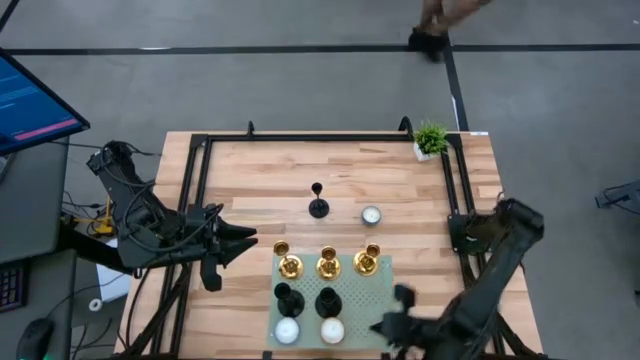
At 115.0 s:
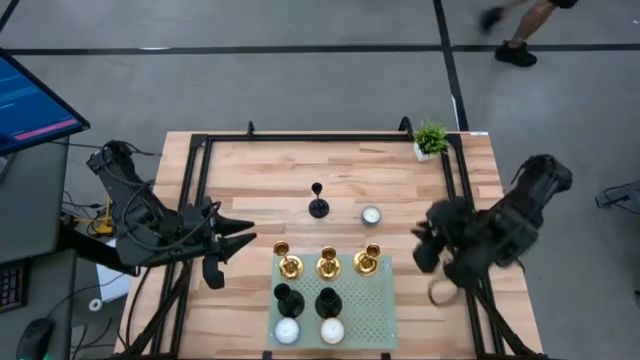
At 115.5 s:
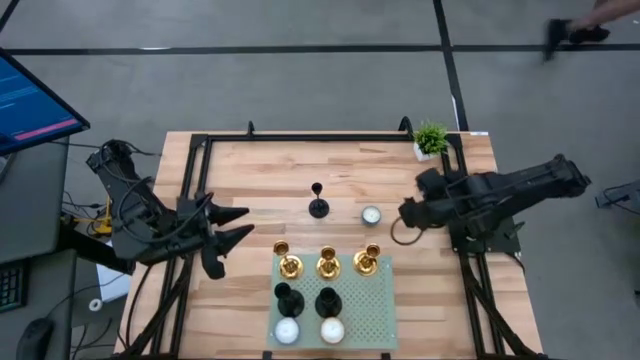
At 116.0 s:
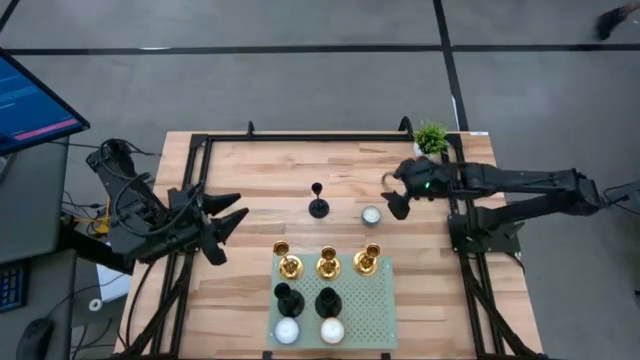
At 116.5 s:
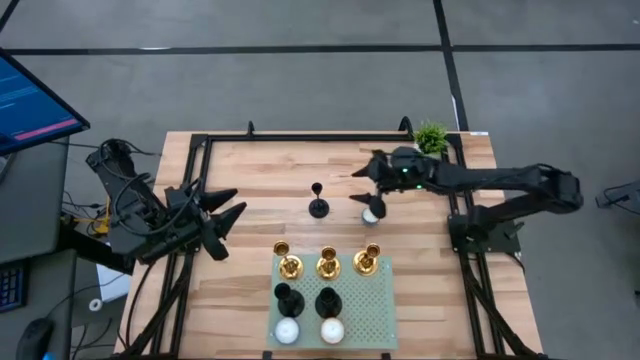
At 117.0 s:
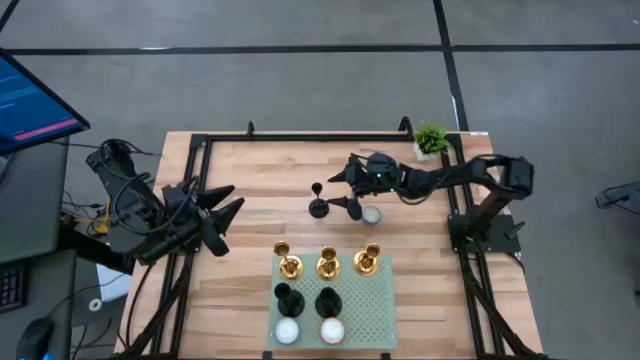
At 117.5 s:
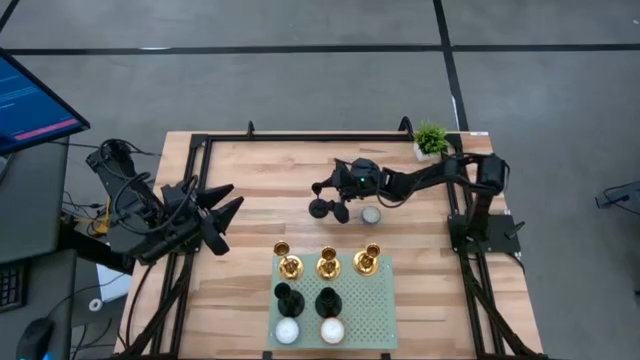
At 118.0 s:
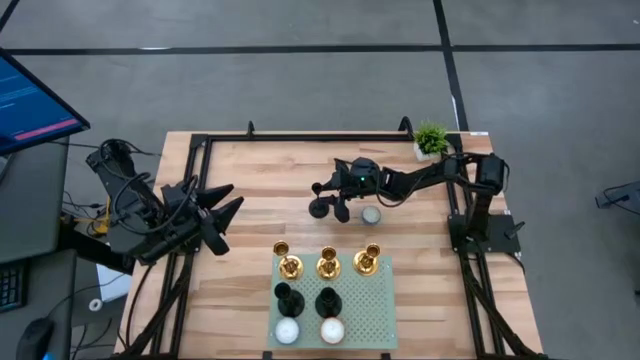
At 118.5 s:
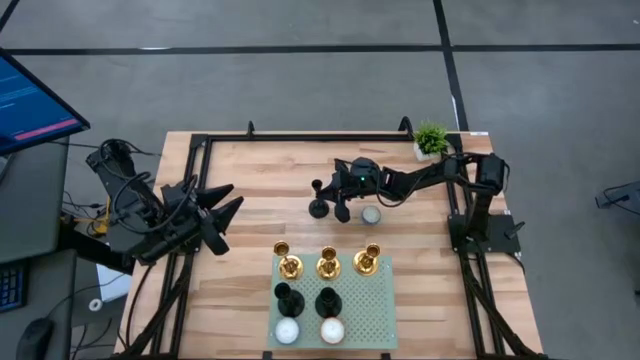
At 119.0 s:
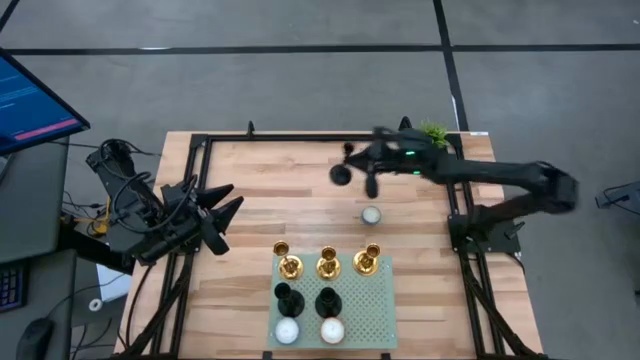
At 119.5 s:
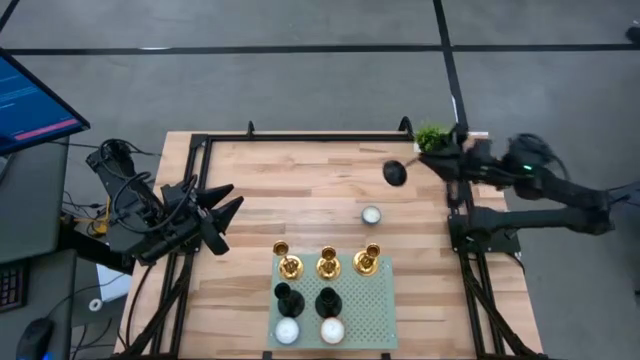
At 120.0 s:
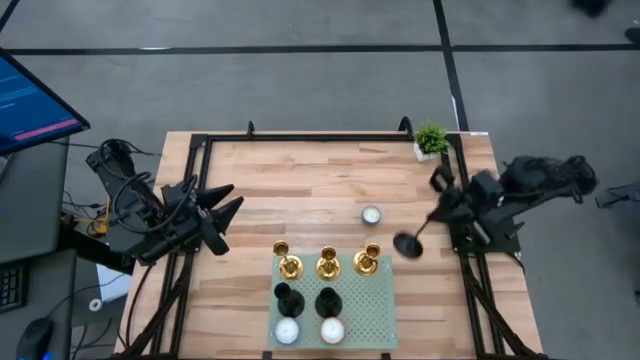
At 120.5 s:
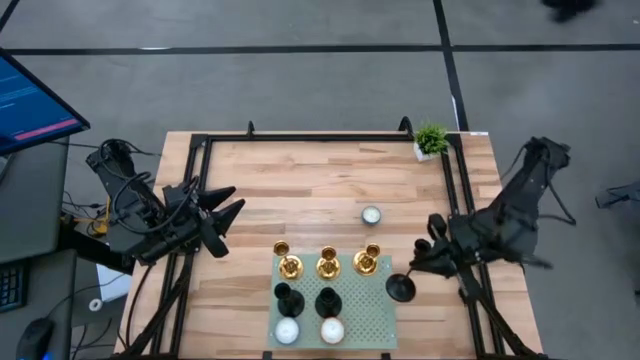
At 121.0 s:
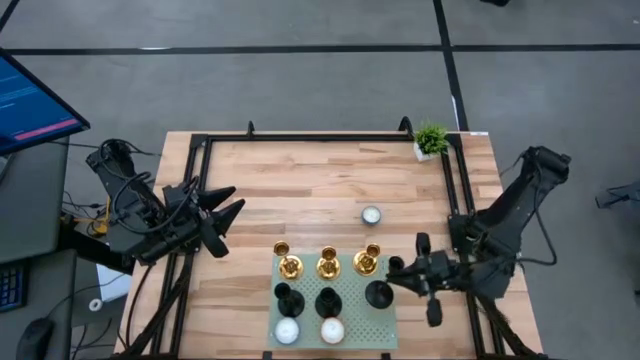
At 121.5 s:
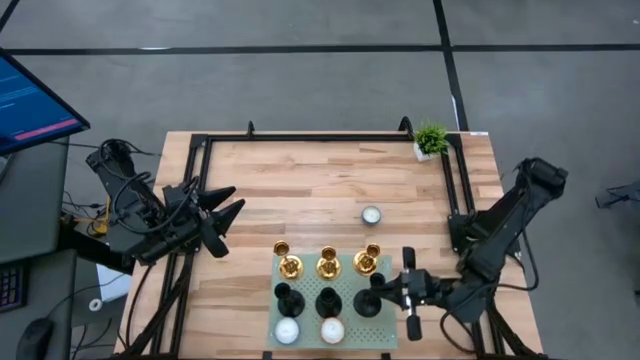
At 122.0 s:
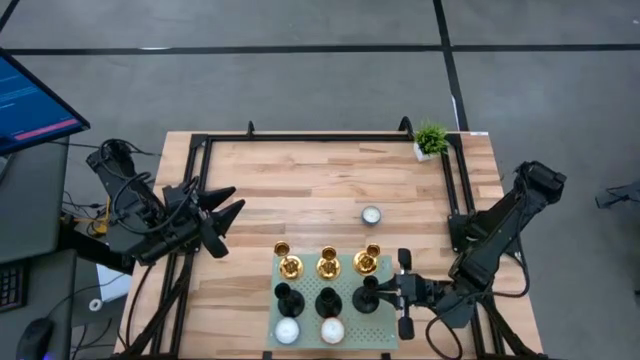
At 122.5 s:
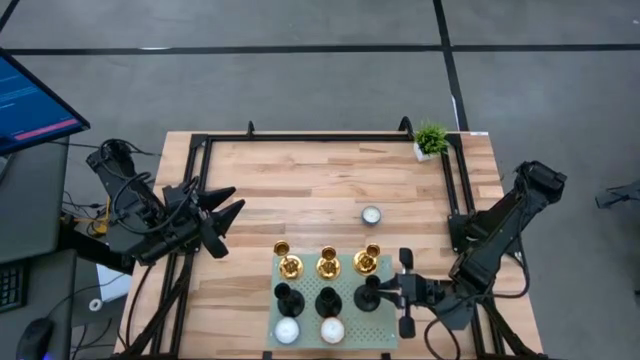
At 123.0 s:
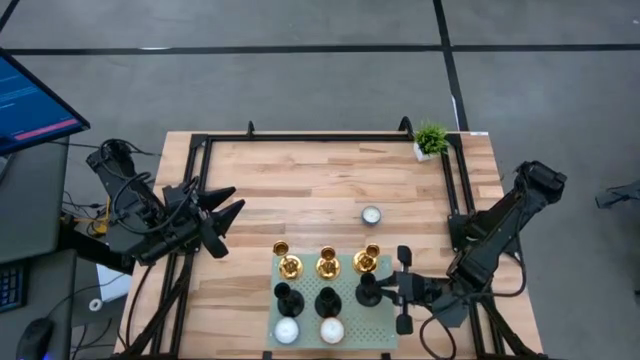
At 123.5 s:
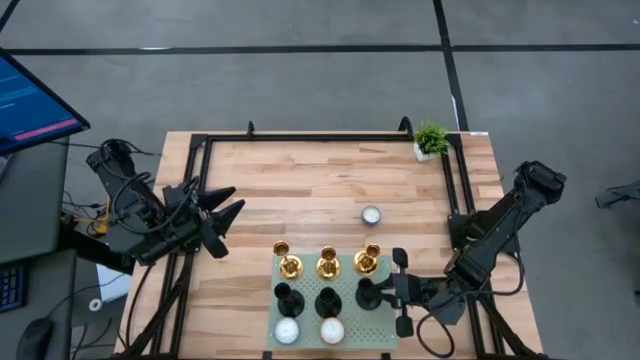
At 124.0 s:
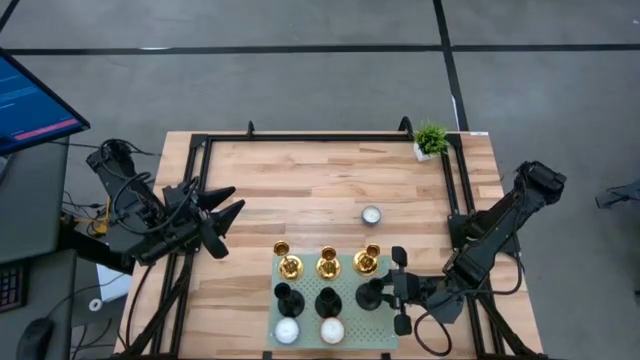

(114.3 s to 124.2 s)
Task: Pick & Place candle stick holders
Put the black candle holder on the shelf aligned with the other black candle holder

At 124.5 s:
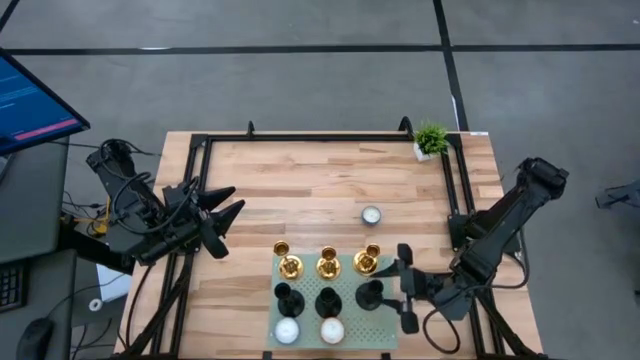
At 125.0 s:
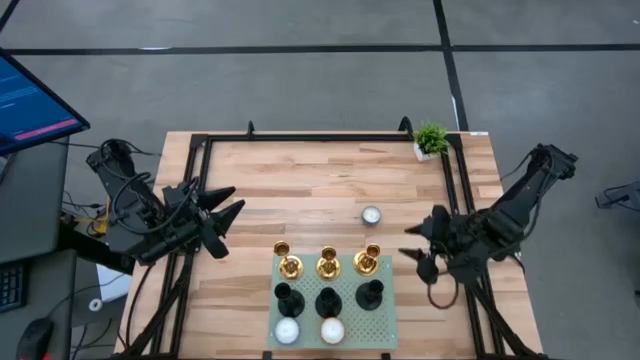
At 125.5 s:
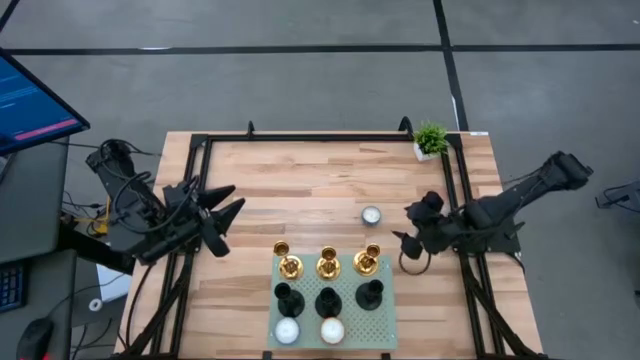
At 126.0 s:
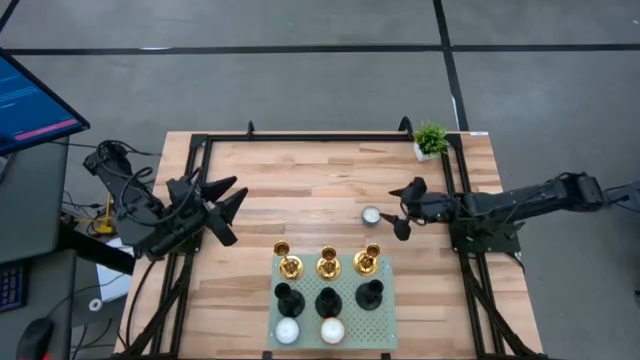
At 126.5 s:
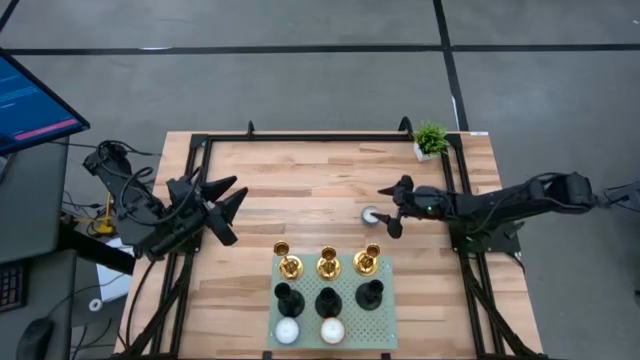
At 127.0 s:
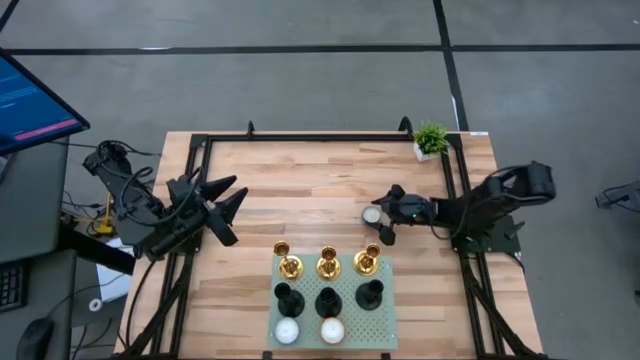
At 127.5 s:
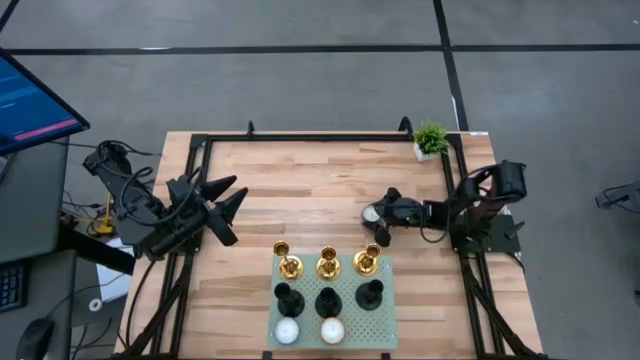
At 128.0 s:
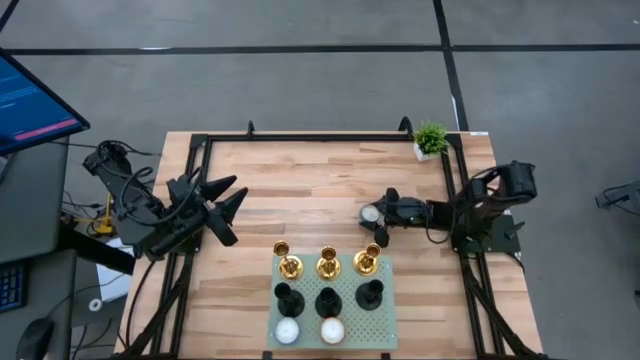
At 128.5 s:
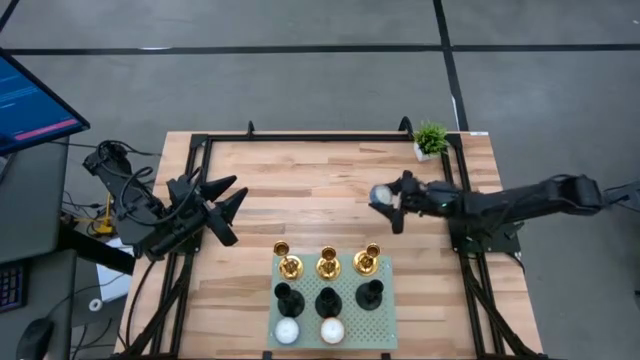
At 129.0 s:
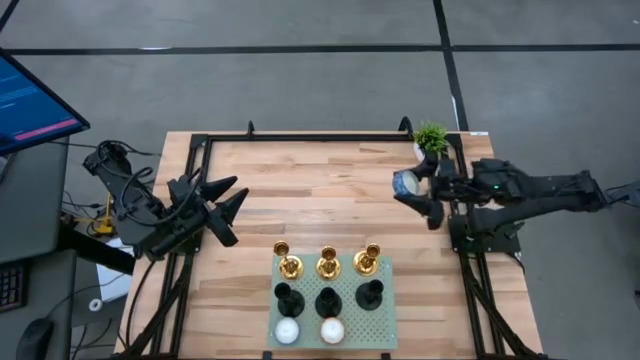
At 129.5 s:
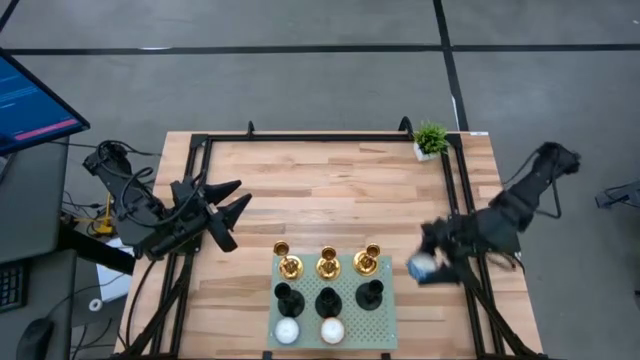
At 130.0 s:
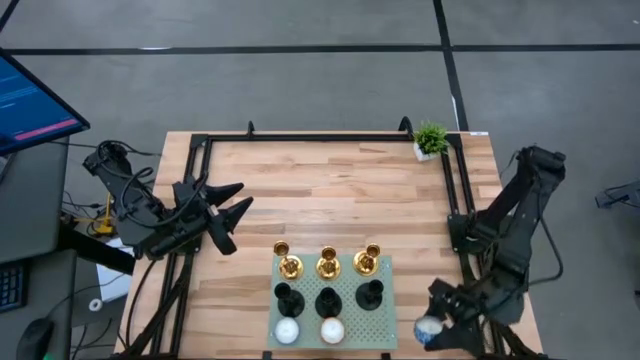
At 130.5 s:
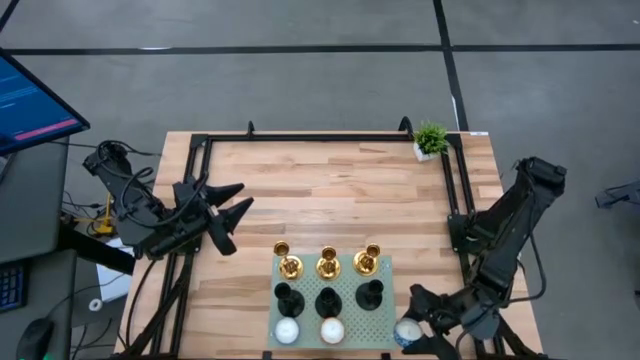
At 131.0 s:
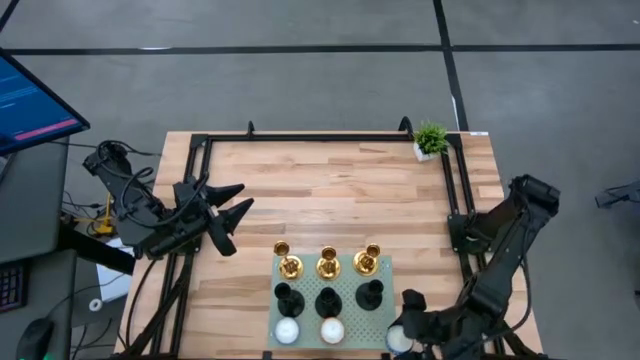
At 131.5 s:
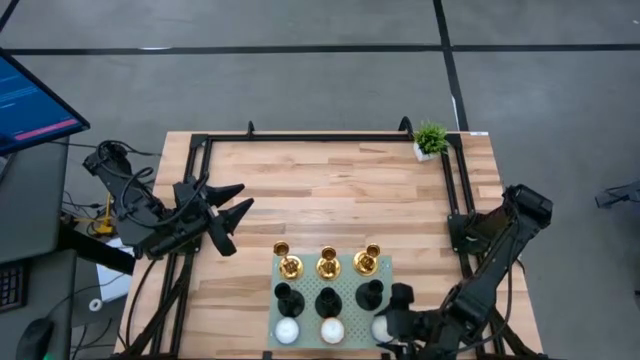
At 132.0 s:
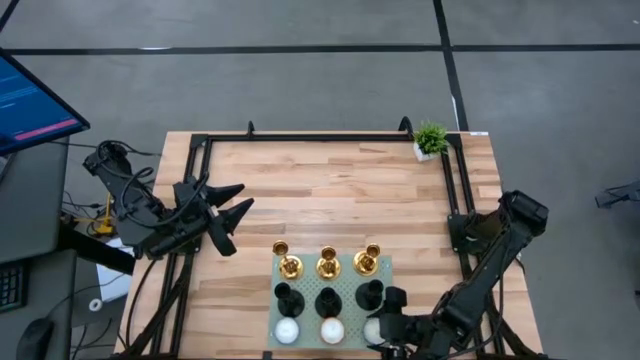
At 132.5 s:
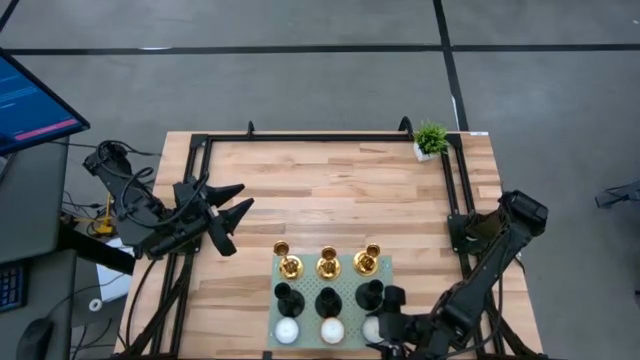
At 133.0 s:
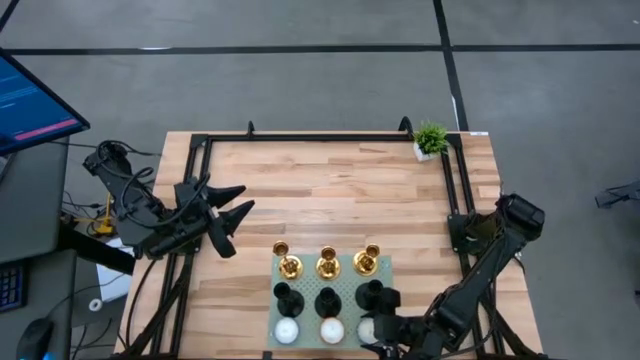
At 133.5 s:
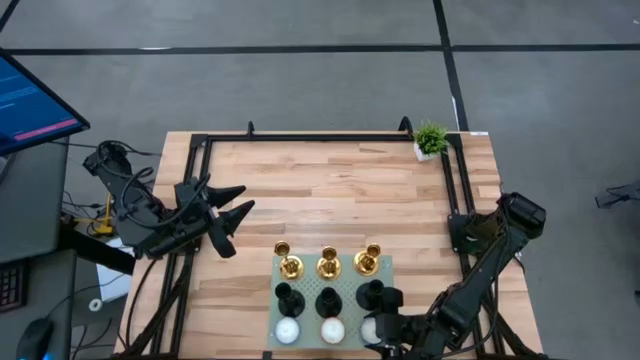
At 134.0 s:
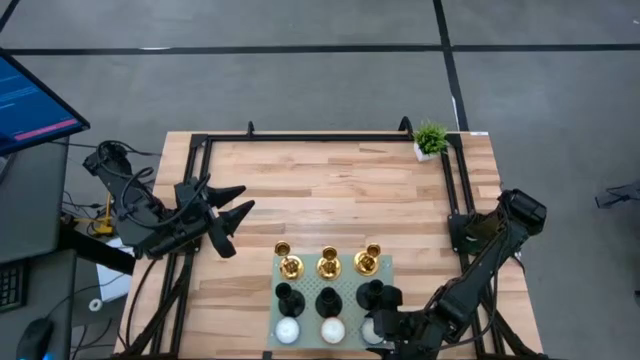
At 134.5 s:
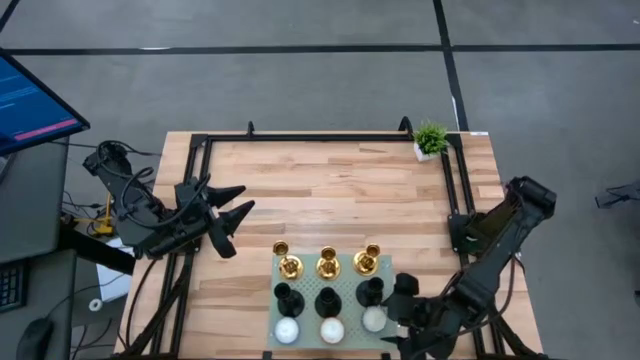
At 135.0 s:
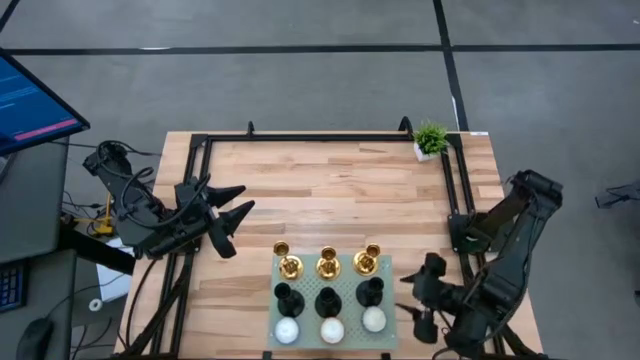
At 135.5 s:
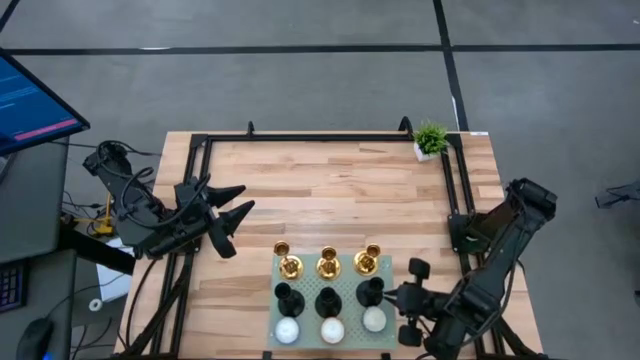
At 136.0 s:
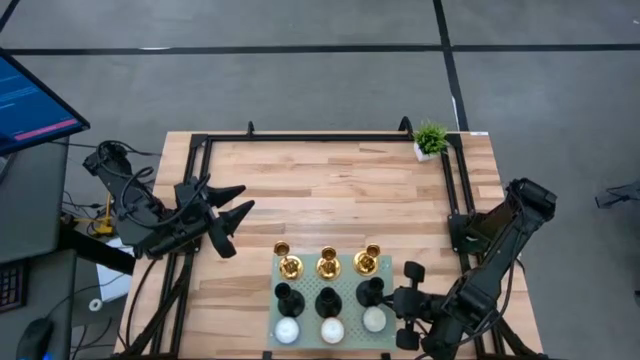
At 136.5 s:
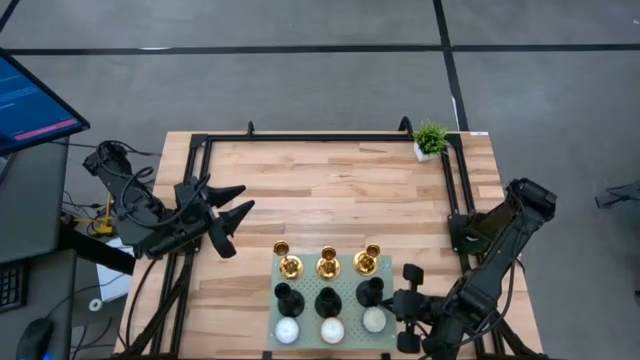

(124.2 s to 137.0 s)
Put the blue scented candle on the shelf aligned with the other orange scented candle
